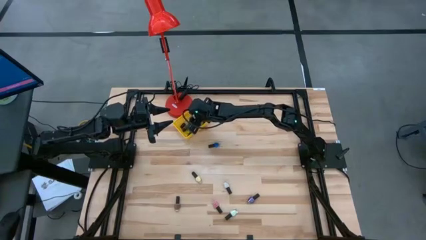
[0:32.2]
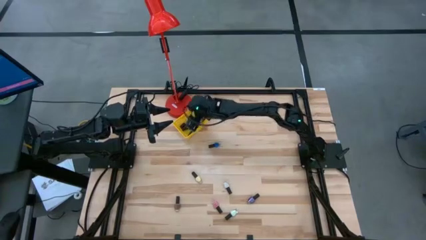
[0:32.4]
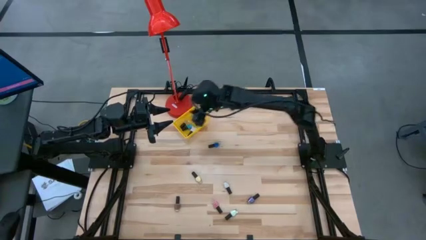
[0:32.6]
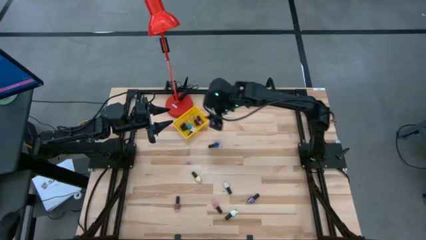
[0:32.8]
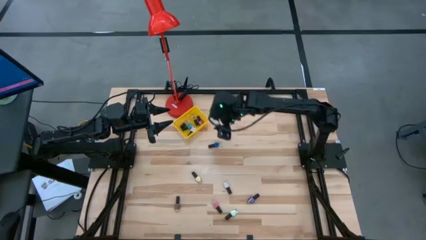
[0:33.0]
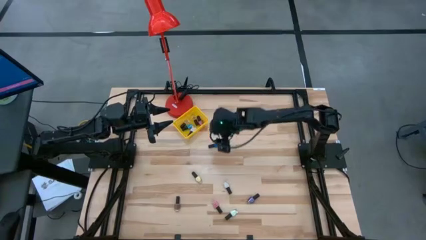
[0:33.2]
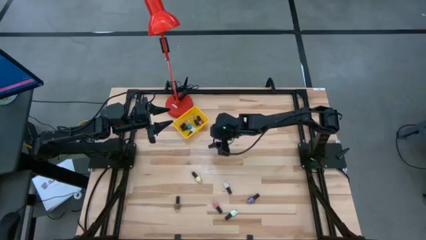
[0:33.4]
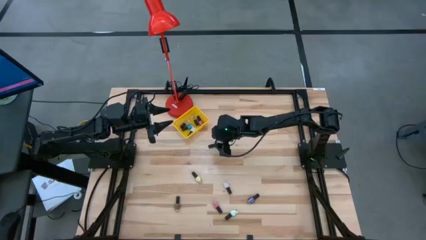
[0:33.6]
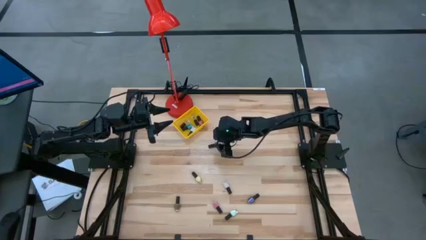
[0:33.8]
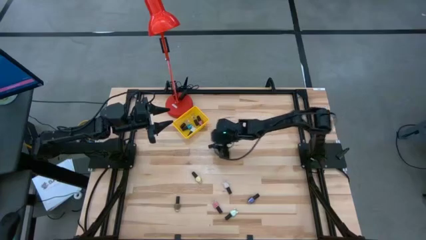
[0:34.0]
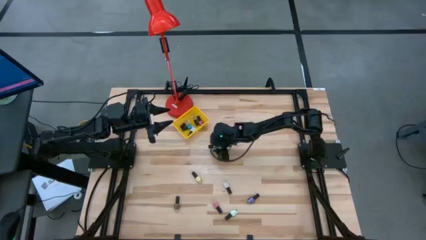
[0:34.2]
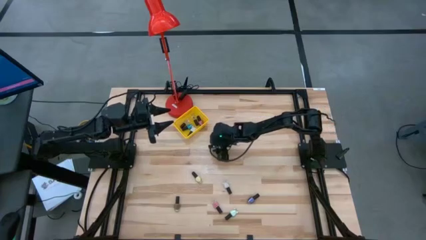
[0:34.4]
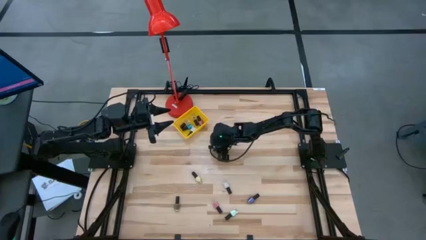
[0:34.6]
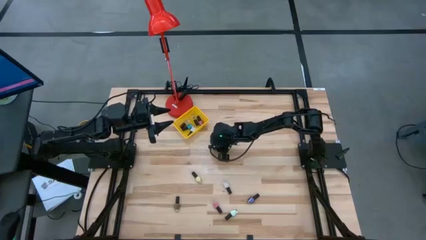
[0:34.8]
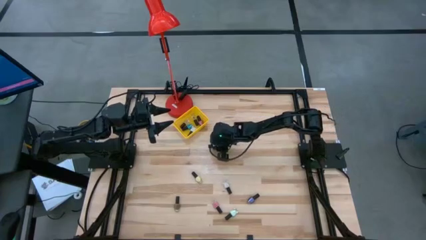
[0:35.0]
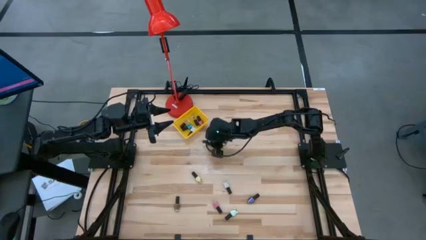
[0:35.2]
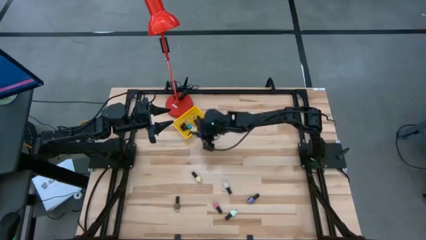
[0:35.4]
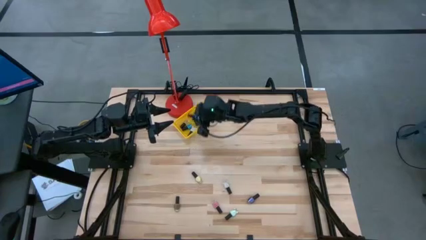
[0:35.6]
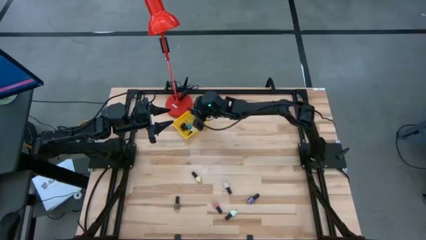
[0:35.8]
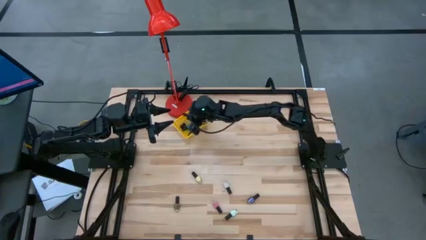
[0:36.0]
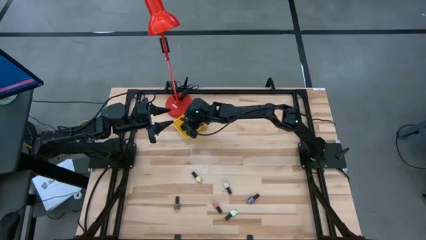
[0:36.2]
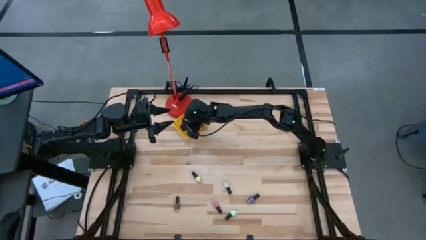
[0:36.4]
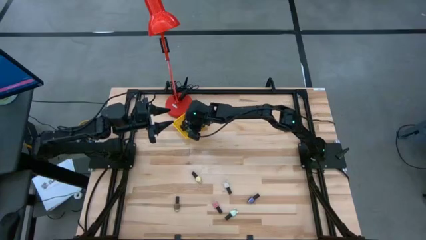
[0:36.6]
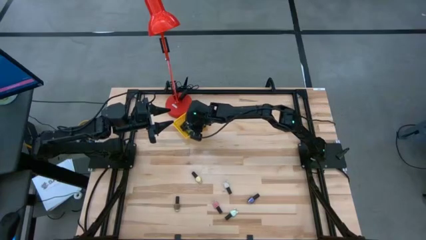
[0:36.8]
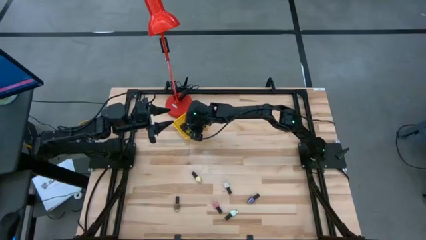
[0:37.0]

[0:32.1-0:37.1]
Task: Pick & Place Nail Polish
Put the blue nail polish into the yellow basket

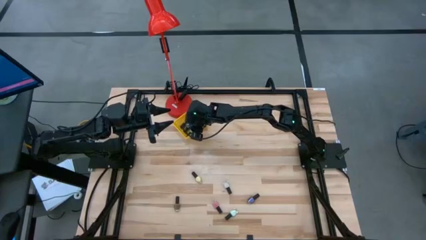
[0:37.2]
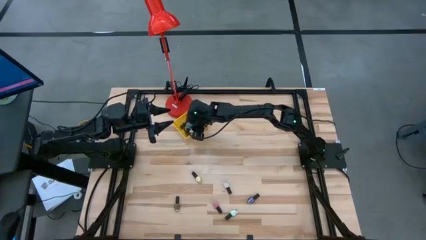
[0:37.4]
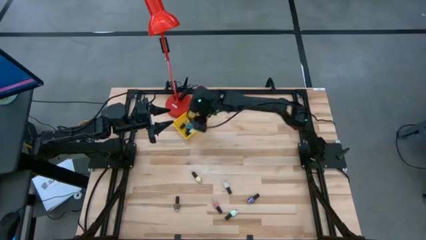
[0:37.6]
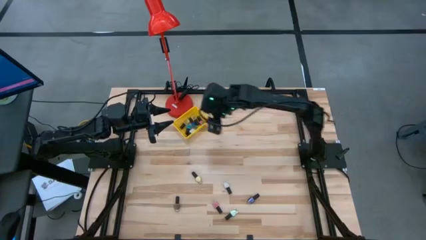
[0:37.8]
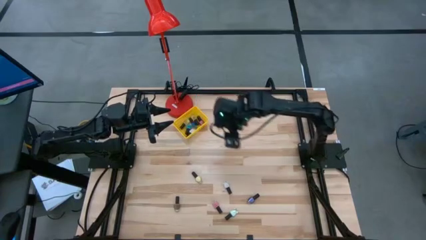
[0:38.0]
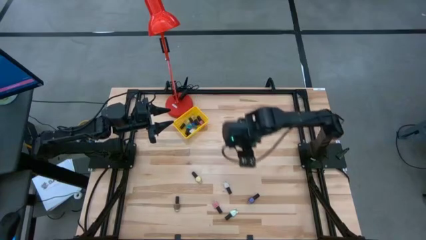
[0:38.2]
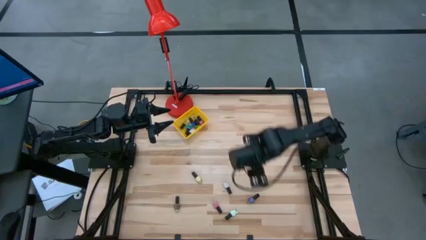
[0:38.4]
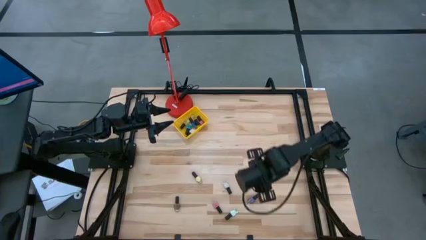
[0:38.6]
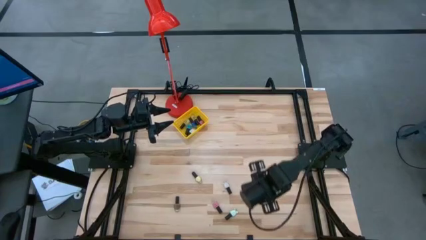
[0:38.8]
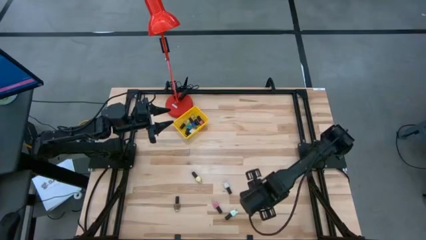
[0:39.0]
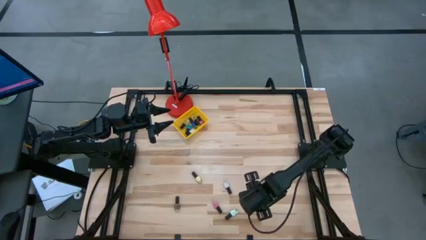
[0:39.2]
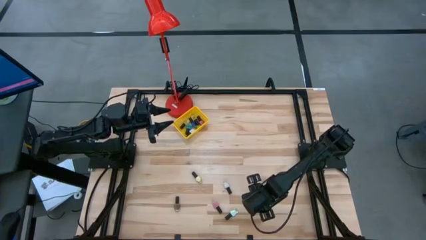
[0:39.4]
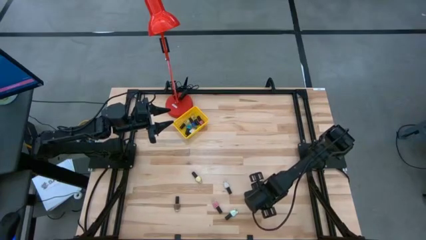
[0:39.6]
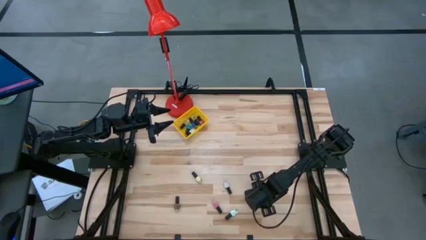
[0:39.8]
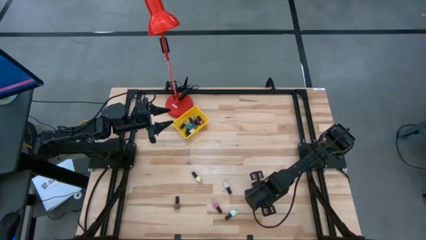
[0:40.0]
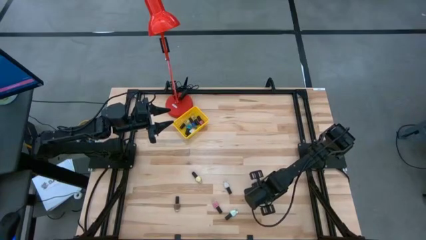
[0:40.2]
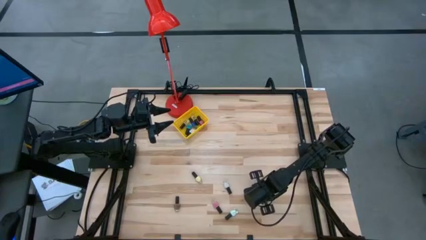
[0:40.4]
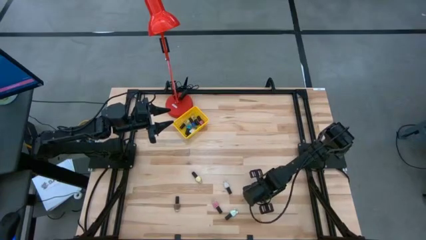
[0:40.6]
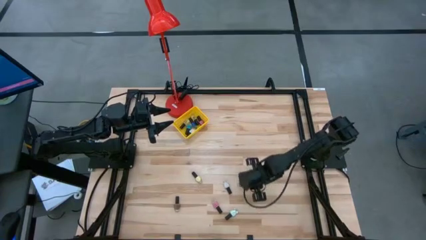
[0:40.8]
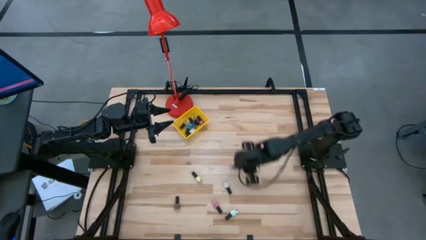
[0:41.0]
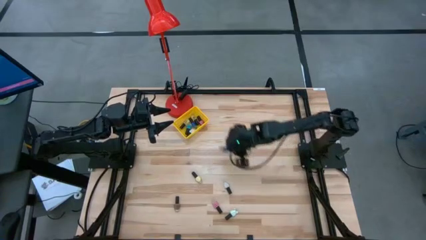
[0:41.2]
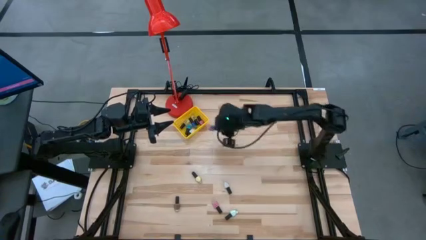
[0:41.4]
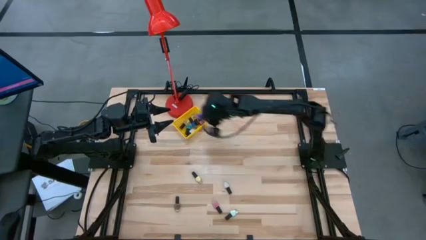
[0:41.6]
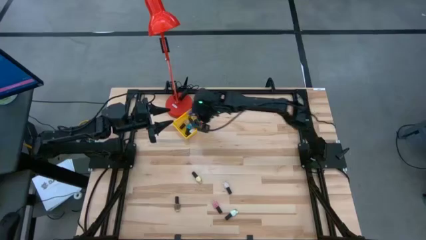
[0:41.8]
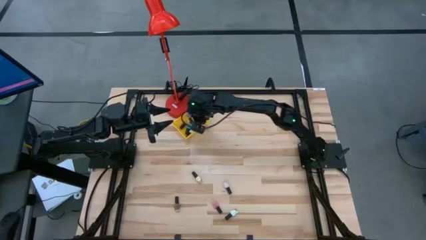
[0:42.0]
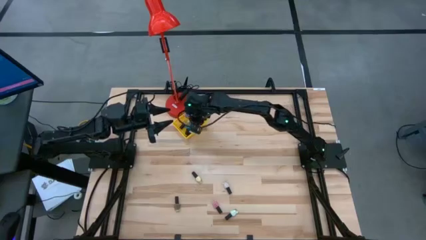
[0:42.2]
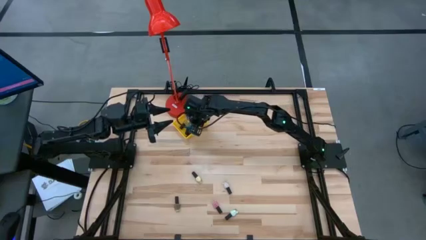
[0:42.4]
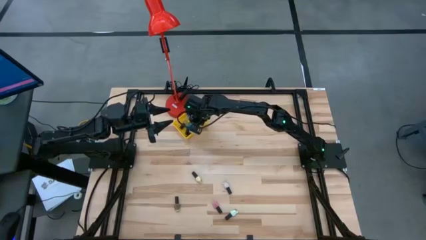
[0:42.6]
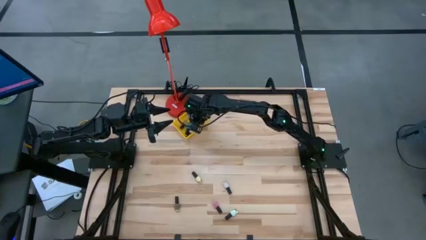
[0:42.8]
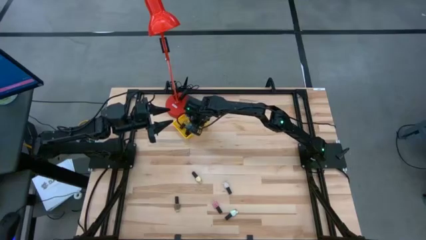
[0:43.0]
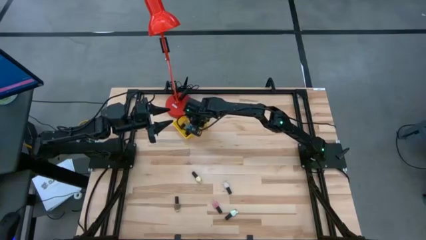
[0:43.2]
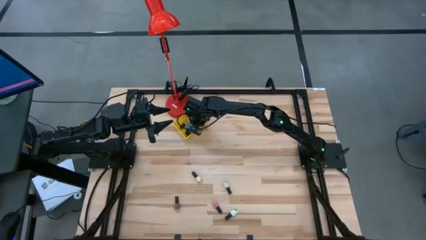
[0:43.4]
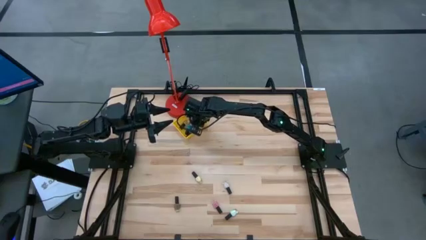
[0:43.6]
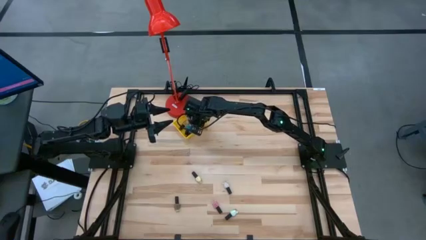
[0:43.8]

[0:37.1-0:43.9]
Put the violet nail polish into the yellow basket

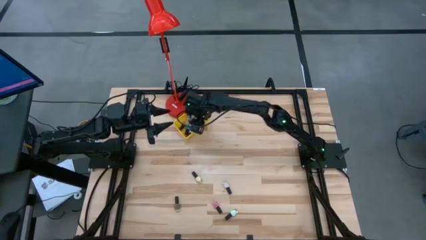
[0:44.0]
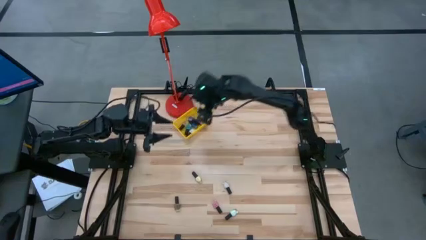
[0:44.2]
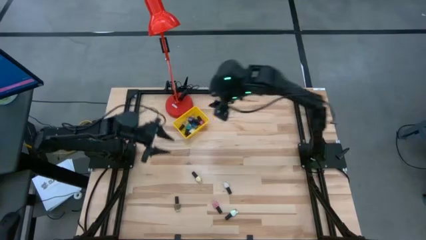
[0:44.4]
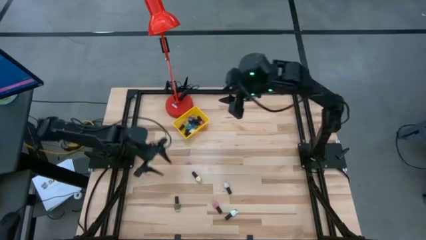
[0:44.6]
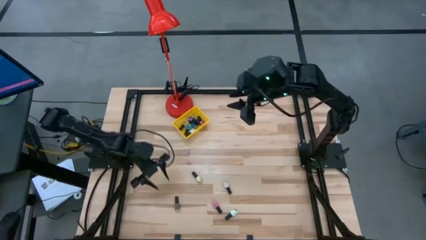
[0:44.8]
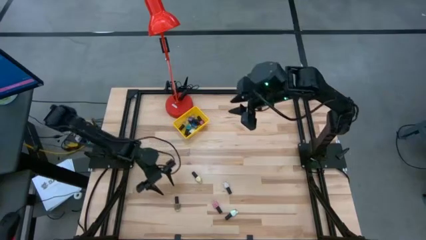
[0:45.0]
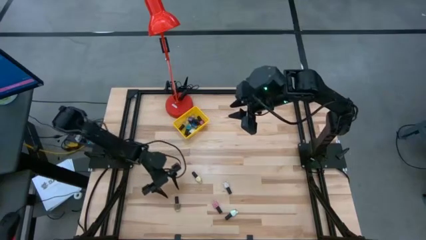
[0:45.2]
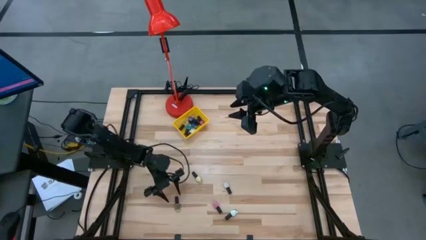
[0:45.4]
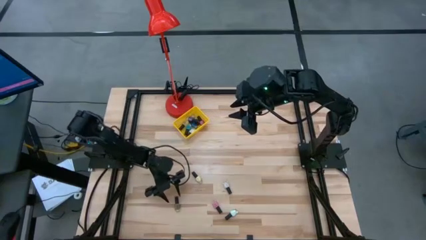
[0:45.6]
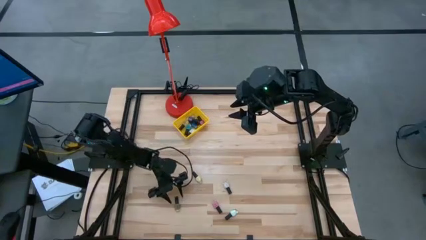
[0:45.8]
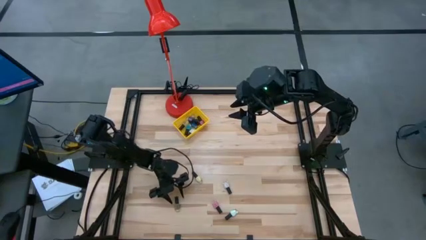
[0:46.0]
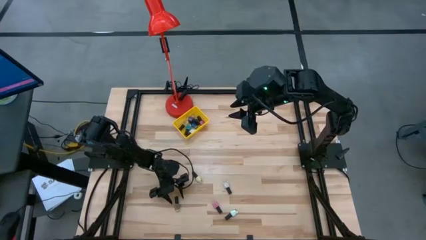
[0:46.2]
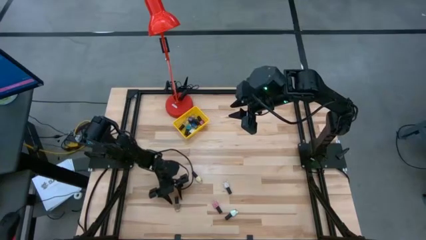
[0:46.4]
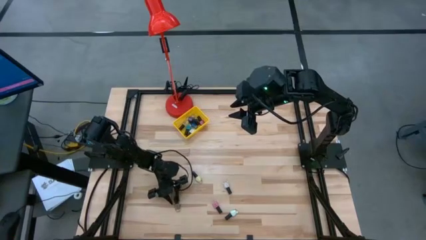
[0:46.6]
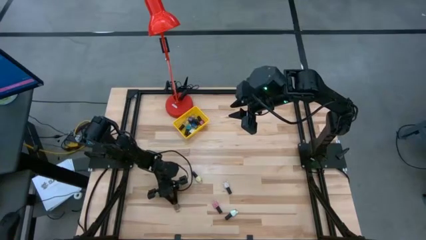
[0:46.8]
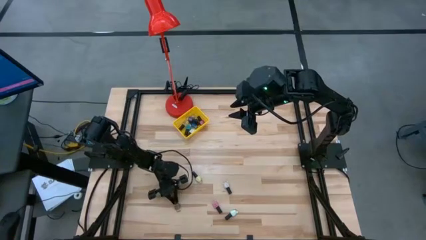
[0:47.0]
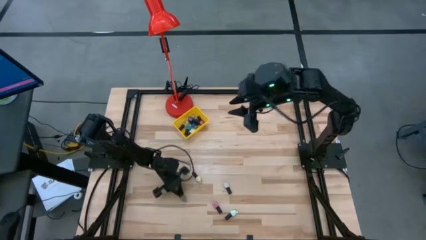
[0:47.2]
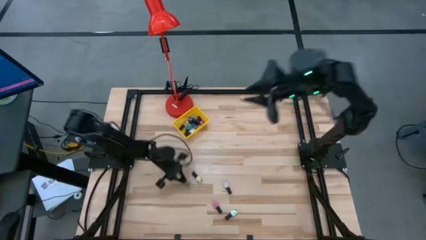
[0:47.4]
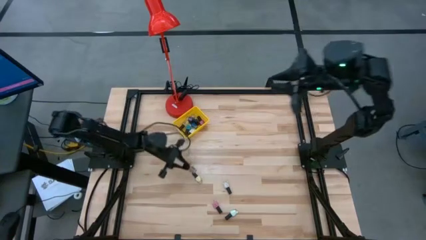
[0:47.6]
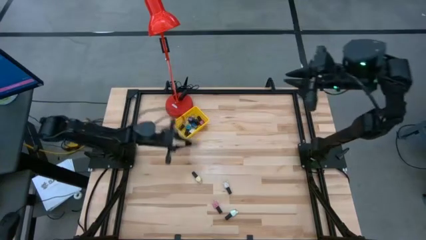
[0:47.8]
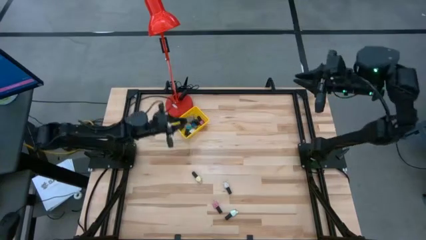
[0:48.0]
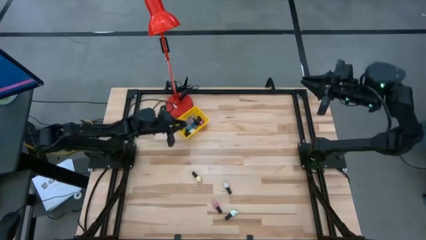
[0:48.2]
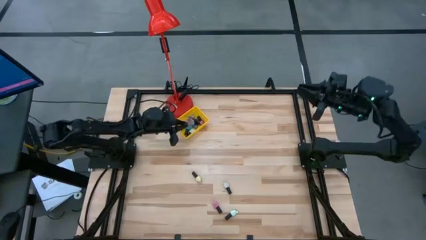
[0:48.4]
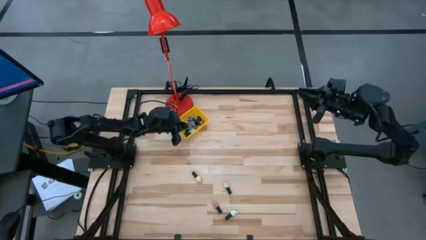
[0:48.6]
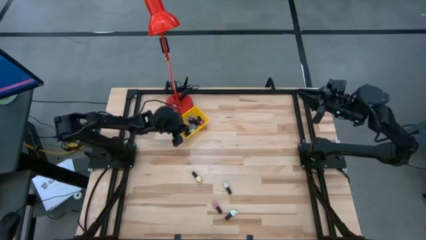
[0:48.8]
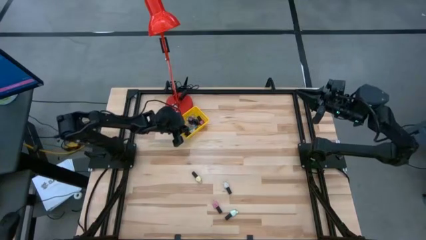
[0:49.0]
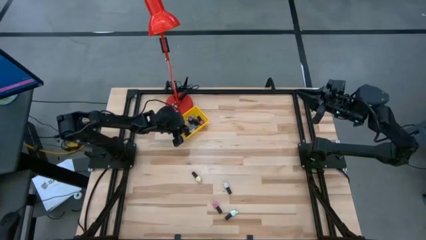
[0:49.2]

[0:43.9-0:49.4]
Put the brown nail polish into the yellow basket
